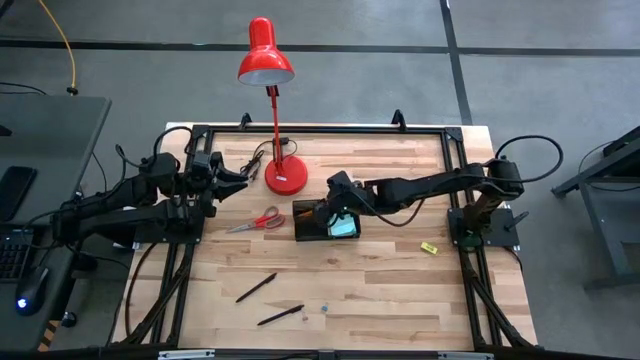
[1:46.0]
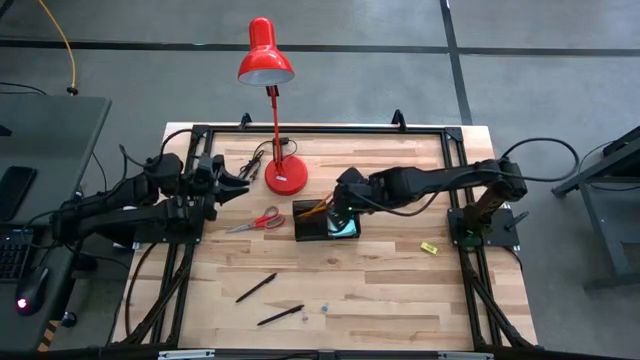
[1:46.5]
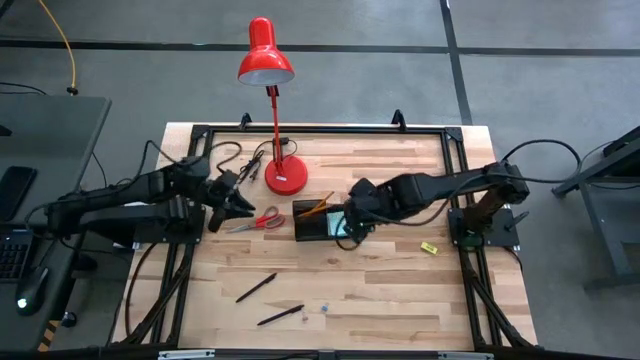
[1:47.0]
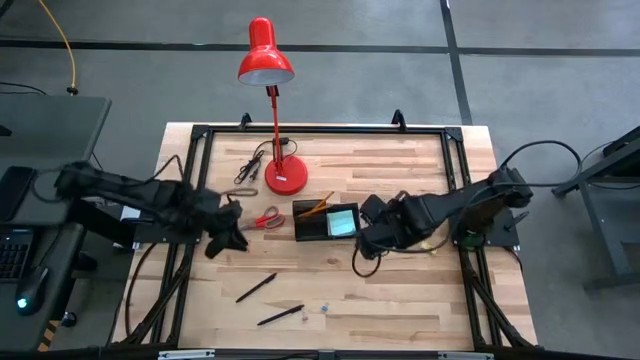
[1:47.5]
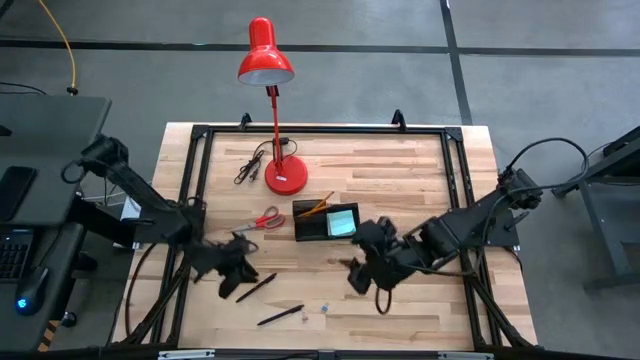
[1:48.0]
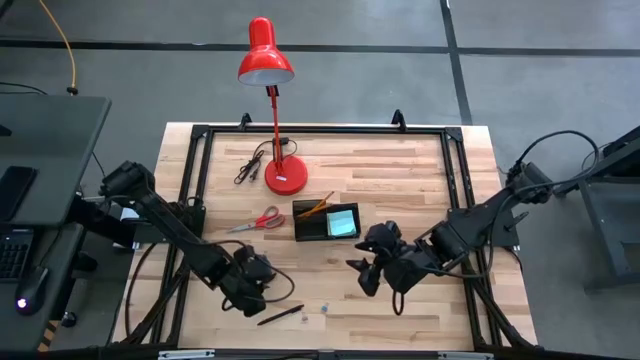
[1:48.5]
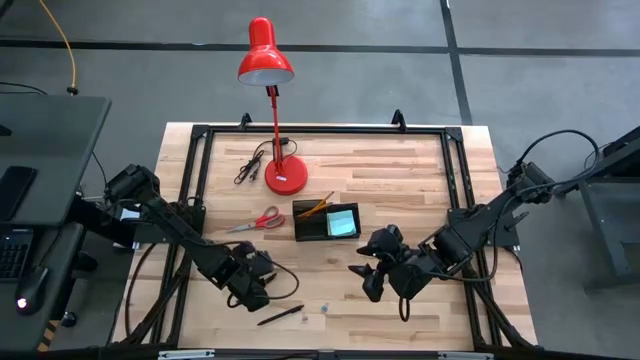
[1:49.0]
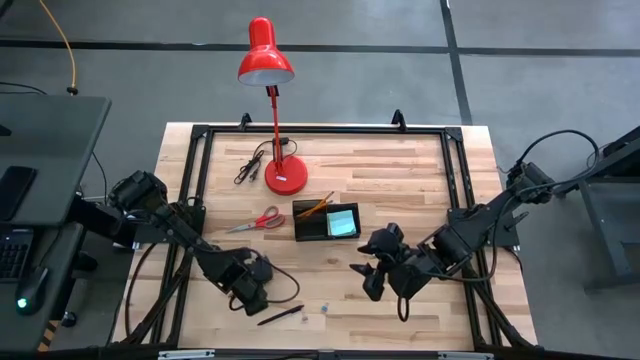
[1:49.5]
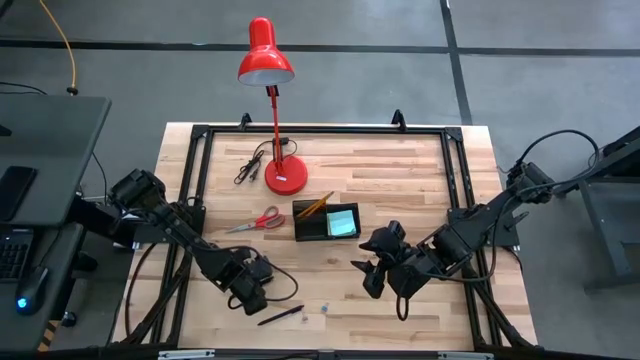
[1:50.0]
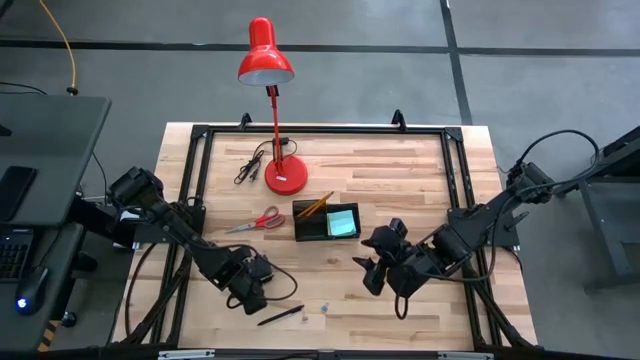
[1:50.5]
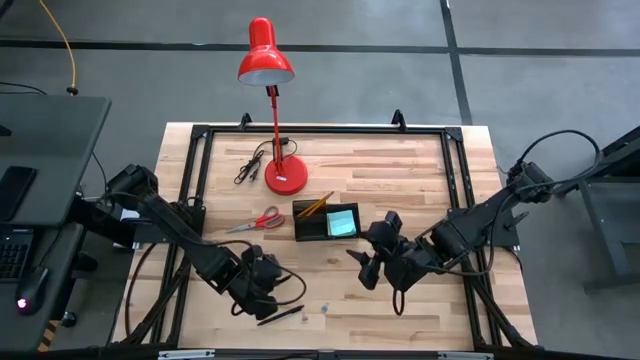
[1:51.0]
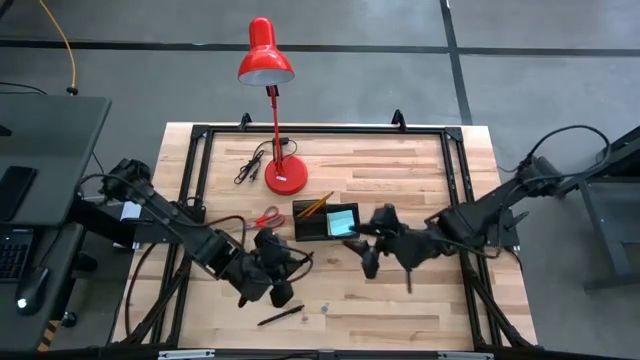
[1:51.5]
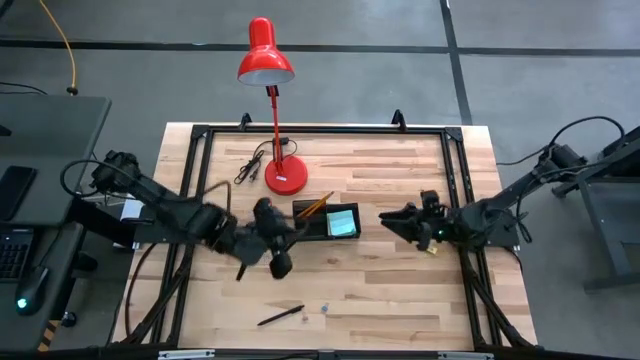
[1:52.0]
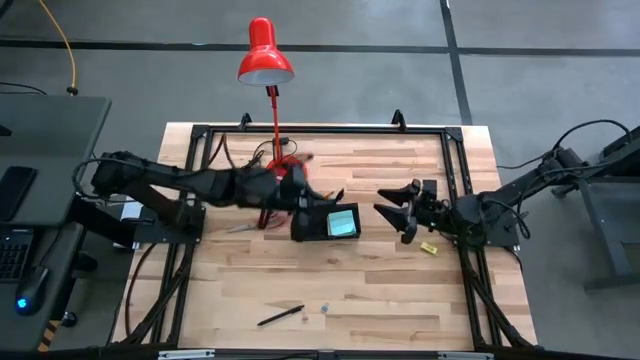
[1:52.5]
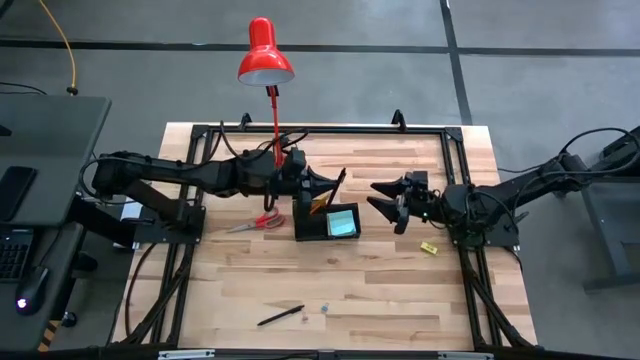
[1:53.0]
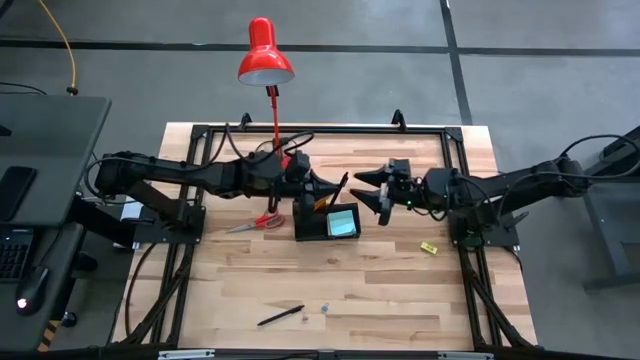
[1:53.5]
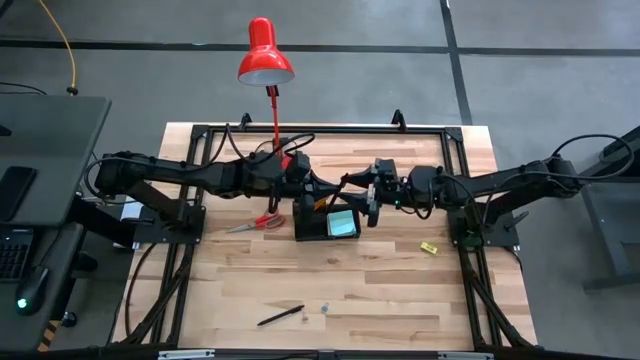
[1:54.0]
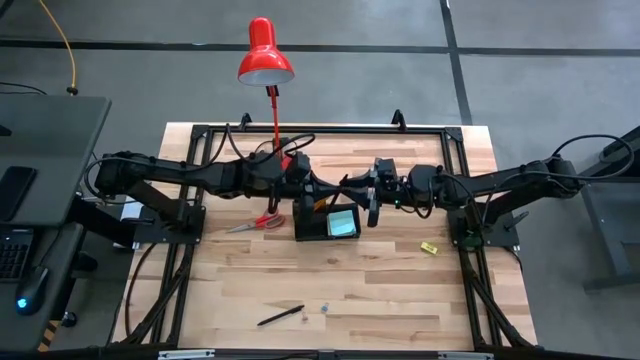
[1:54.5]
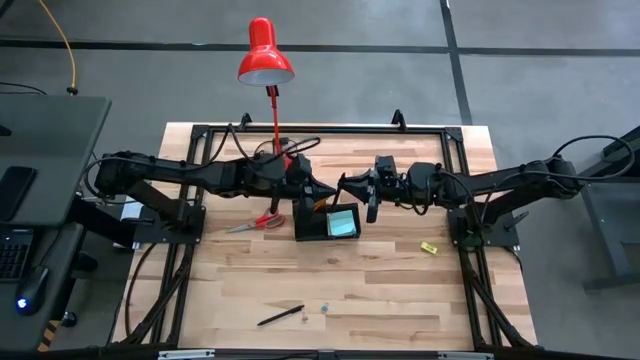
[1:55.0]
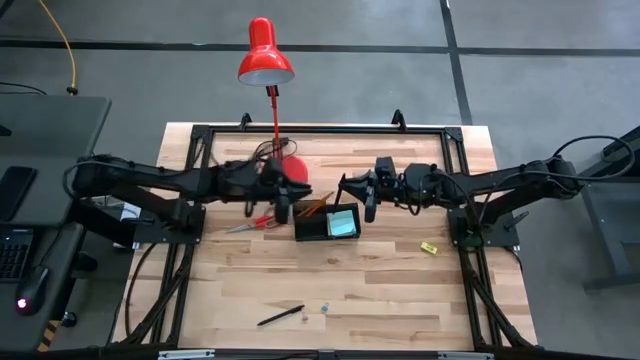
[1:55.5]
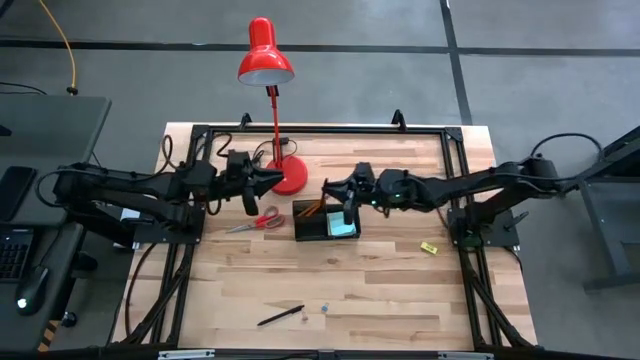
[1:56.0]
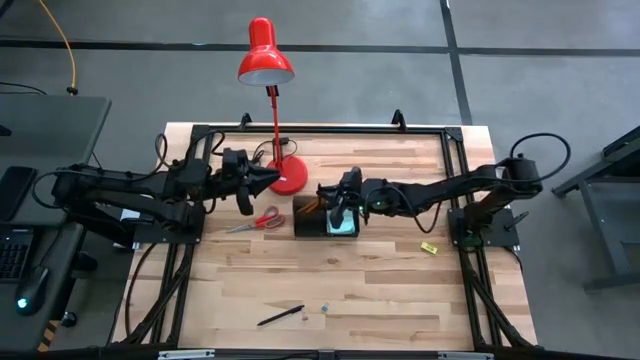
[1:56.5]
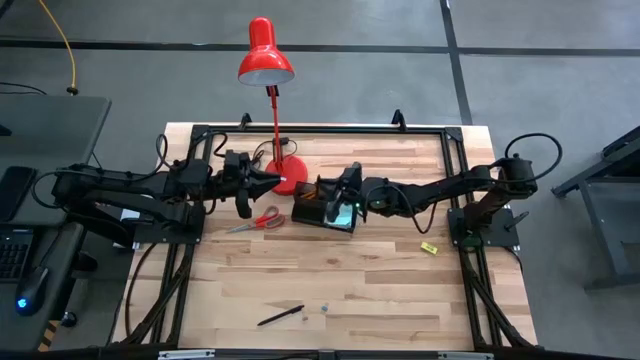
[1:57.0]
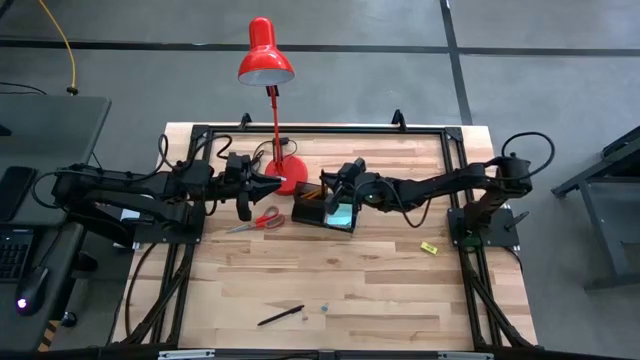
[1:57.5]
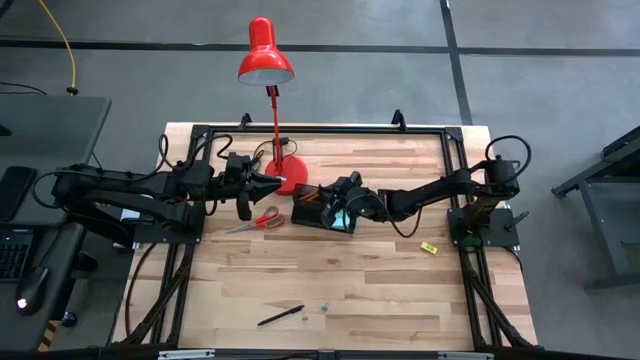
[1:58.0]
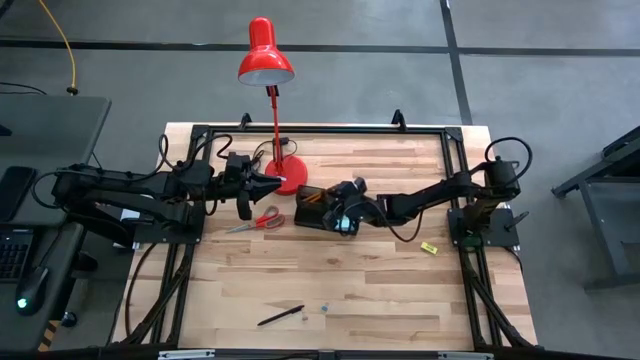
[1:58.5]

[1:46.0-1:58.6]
Task: Pick and place office supplies into organizer
Put the black pen into the black desk organizer

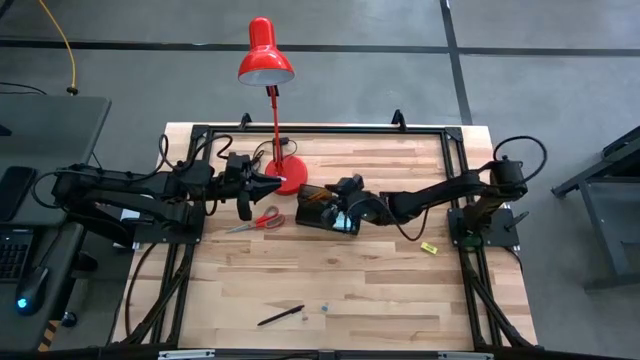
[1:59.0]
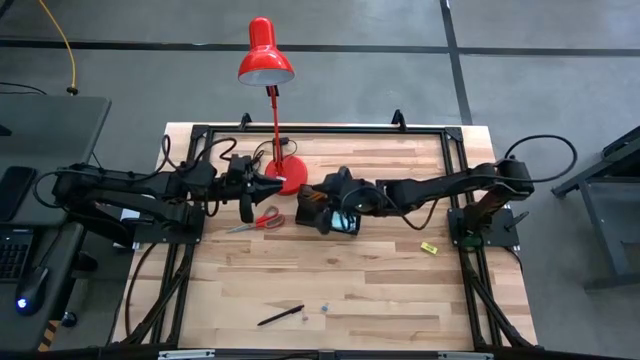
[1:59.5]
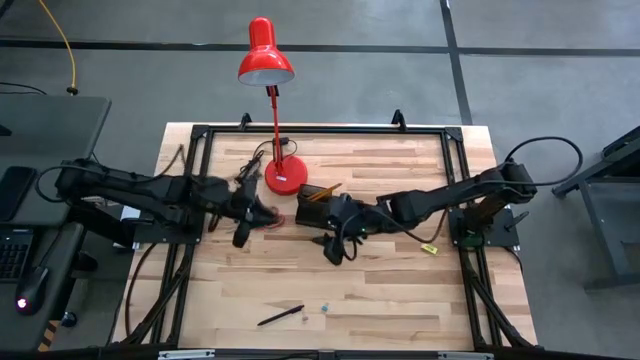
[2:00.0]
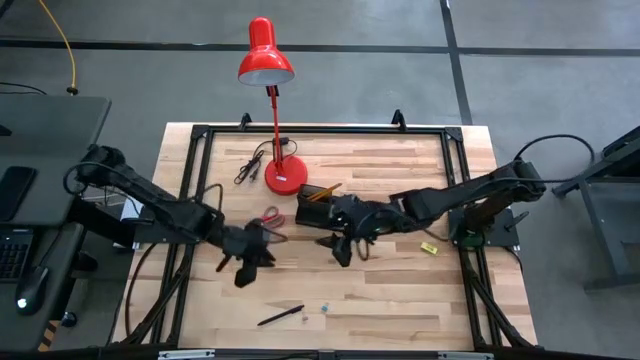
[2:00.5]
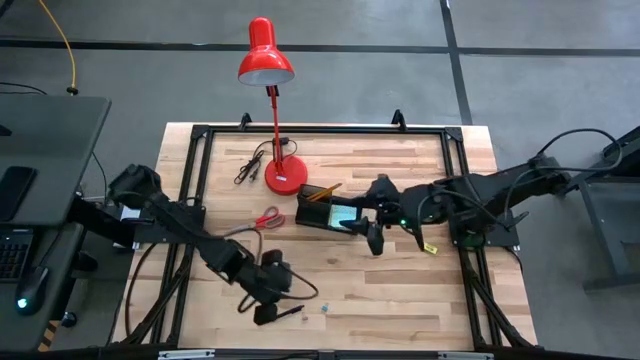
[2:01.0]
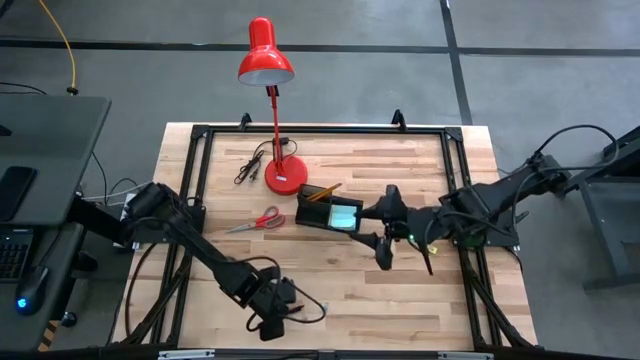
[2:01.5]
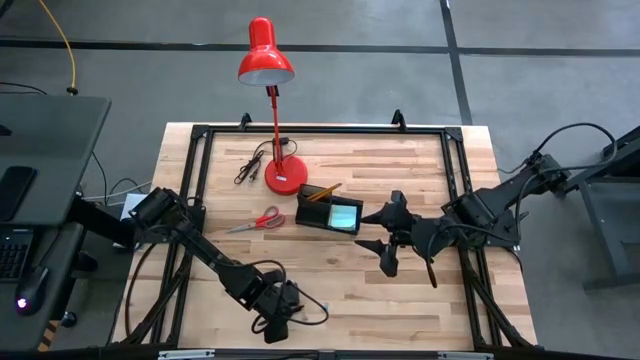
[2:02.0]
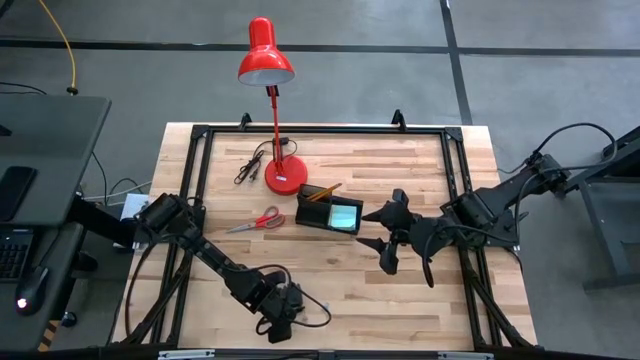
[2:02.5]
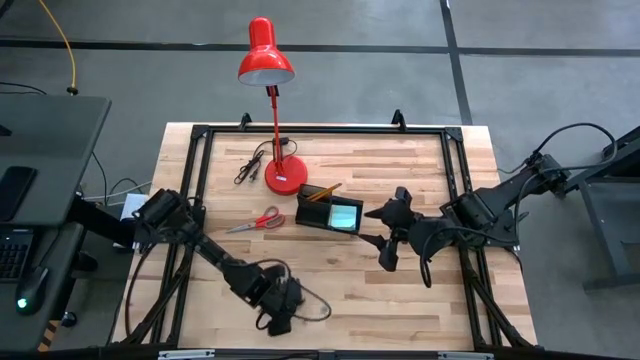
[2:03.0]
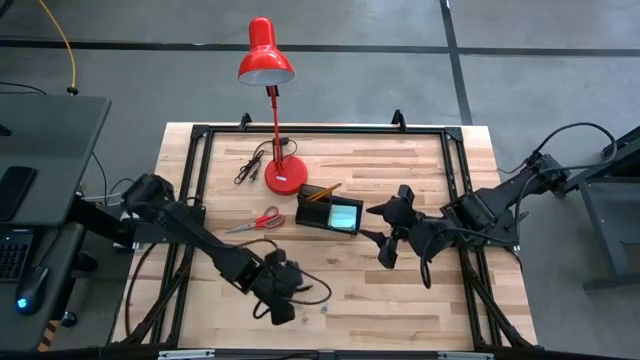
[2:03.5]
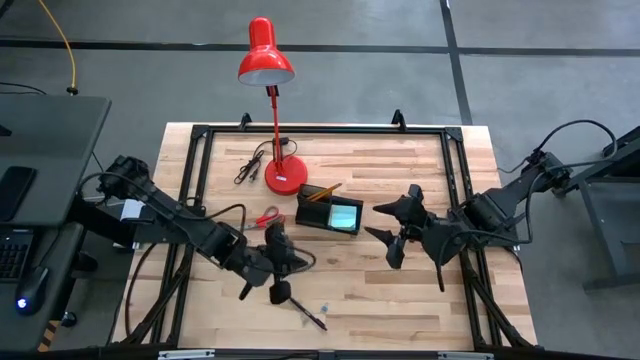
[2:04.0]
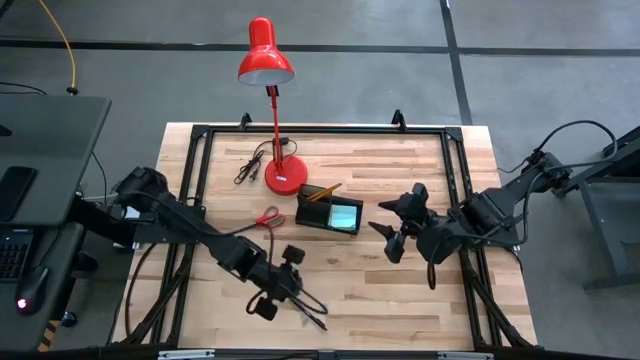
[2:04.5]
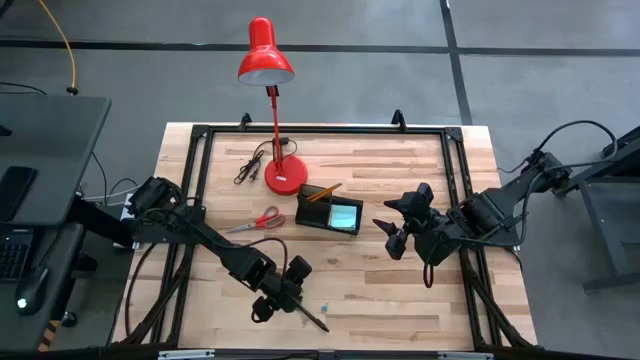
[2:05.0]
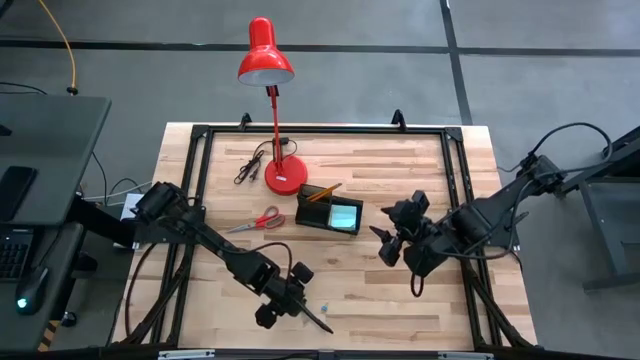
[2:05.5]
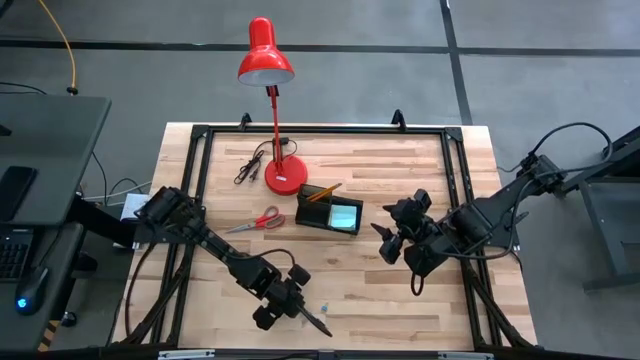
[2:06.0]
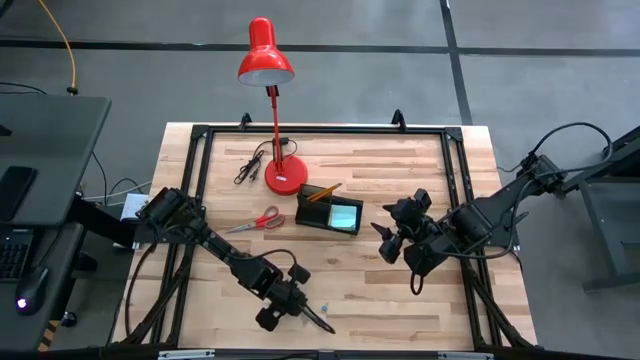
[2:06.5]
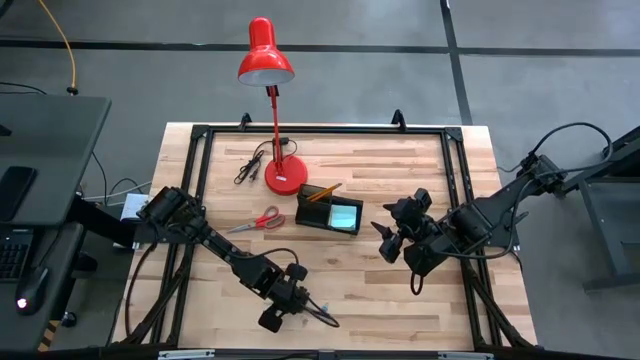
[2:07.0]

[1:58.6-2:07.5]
Put the black pen into the black desk organizer
